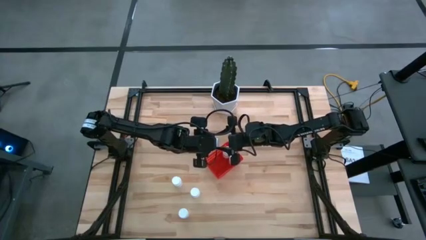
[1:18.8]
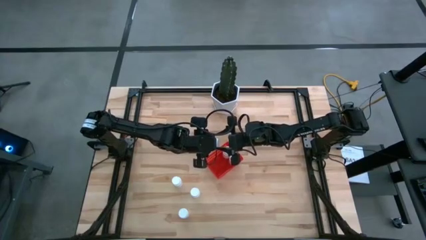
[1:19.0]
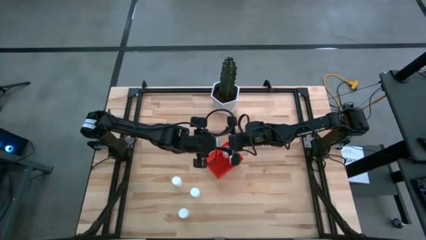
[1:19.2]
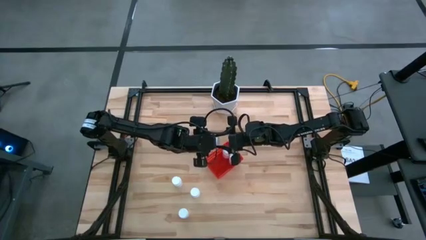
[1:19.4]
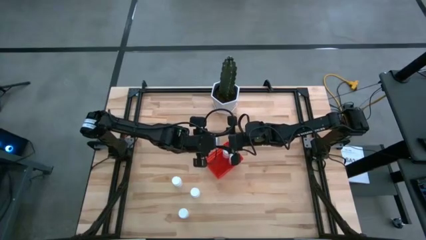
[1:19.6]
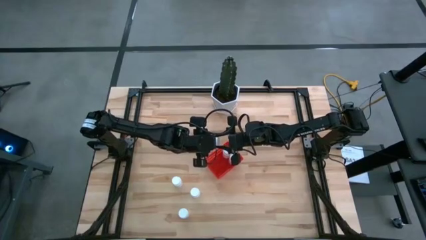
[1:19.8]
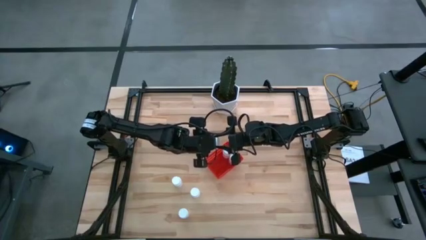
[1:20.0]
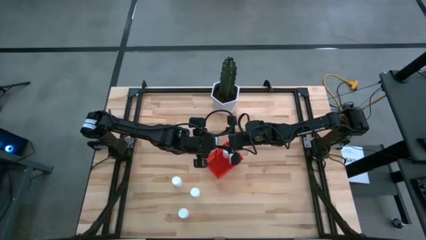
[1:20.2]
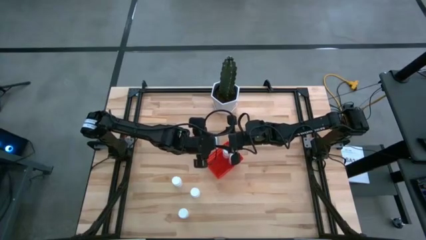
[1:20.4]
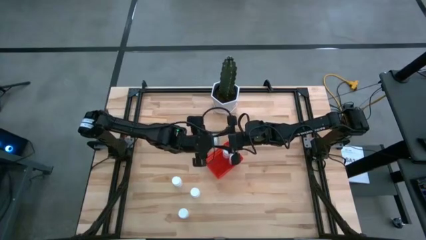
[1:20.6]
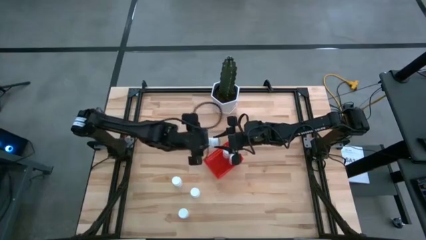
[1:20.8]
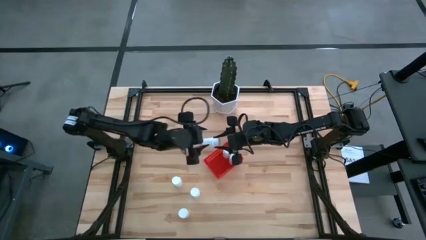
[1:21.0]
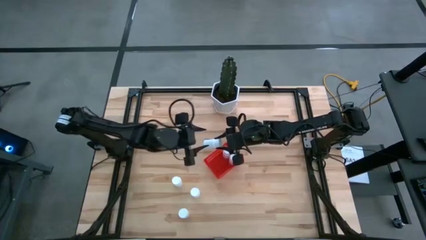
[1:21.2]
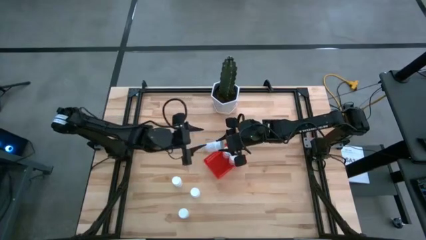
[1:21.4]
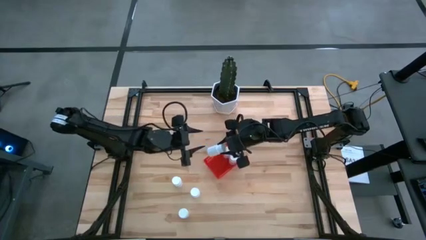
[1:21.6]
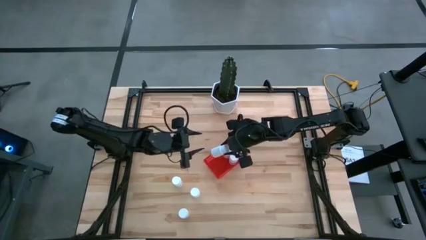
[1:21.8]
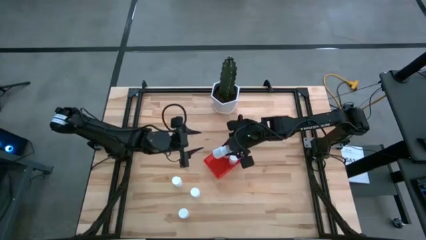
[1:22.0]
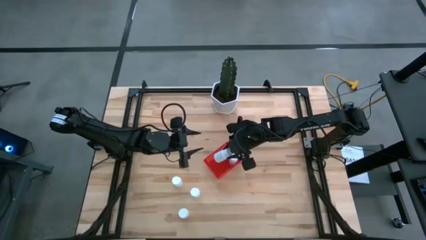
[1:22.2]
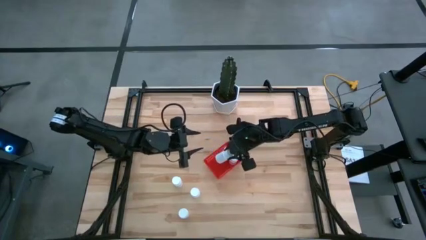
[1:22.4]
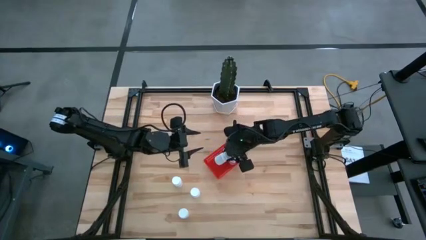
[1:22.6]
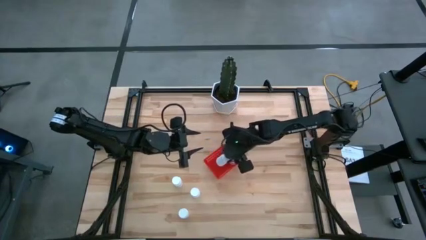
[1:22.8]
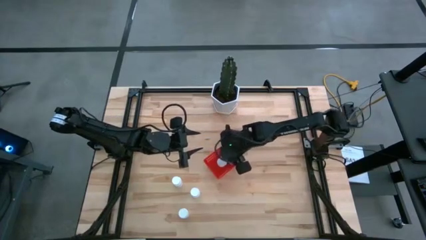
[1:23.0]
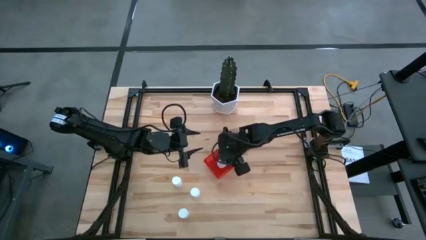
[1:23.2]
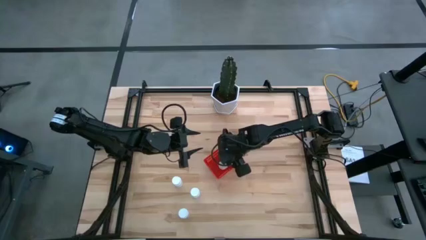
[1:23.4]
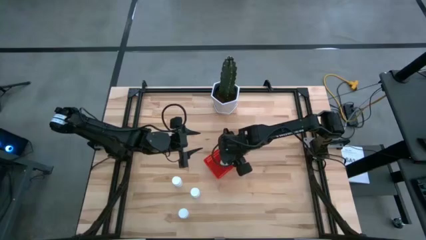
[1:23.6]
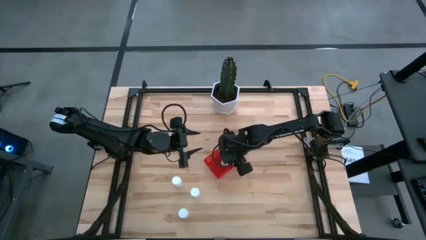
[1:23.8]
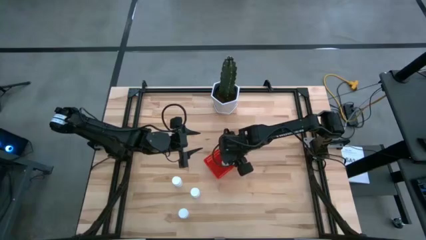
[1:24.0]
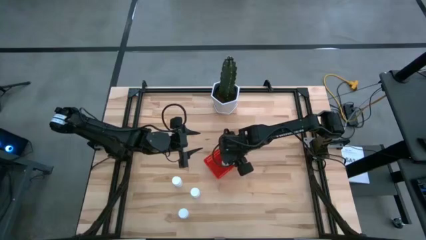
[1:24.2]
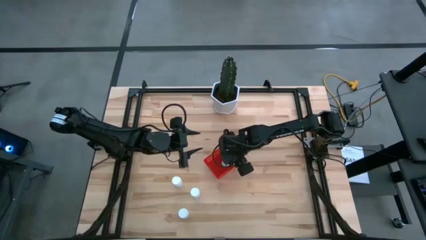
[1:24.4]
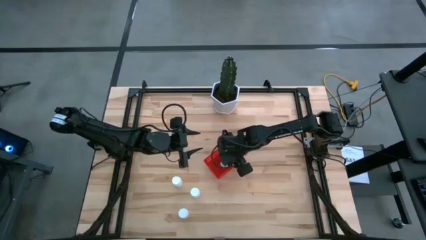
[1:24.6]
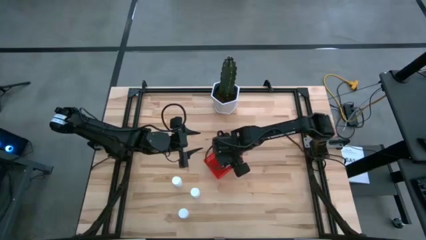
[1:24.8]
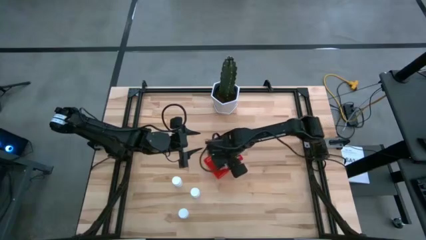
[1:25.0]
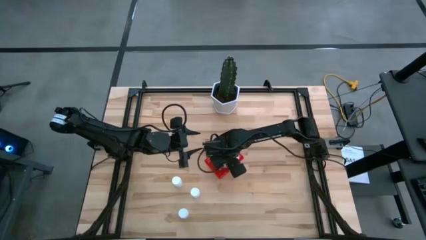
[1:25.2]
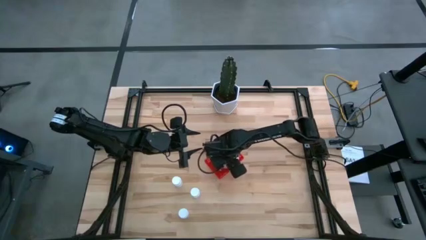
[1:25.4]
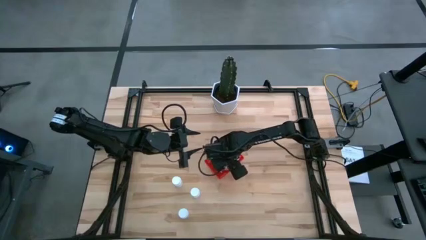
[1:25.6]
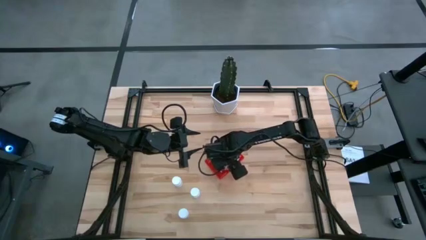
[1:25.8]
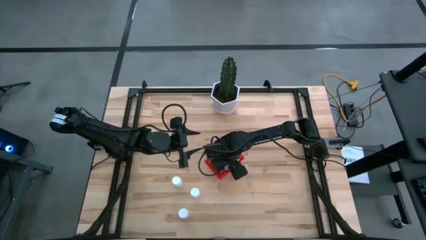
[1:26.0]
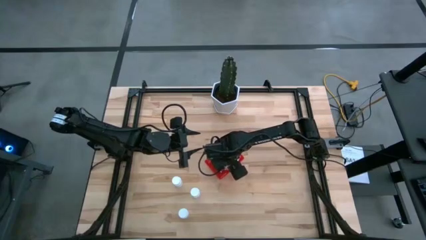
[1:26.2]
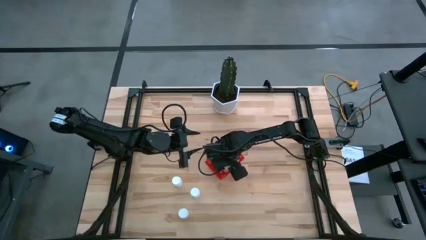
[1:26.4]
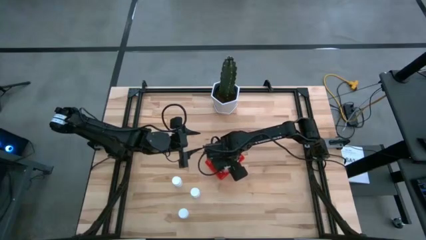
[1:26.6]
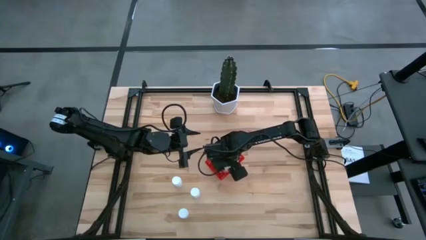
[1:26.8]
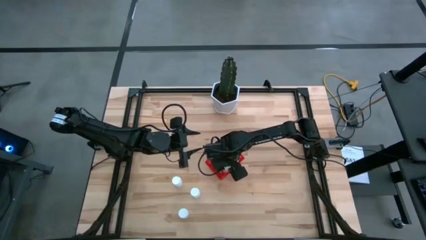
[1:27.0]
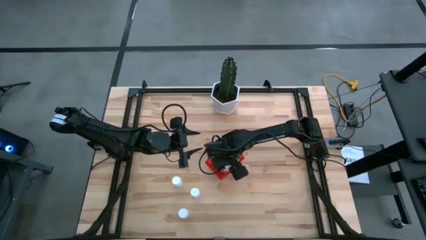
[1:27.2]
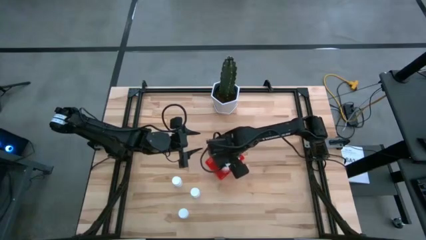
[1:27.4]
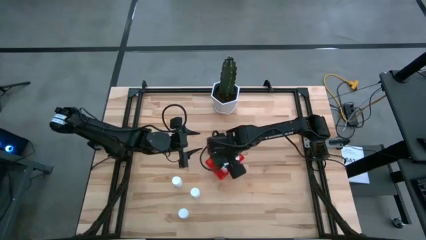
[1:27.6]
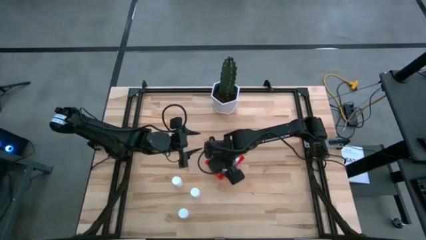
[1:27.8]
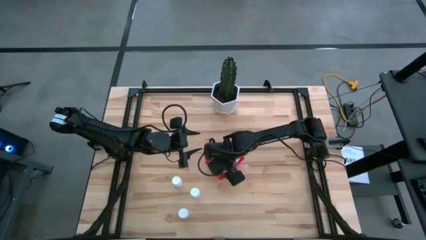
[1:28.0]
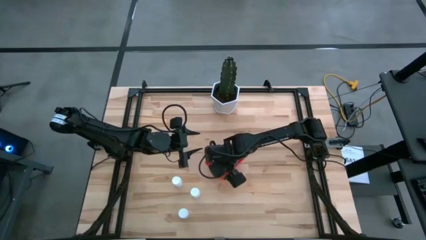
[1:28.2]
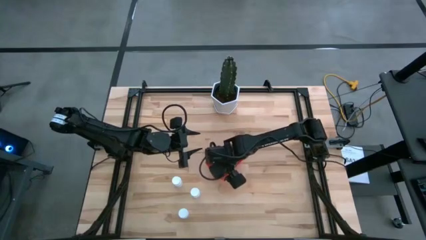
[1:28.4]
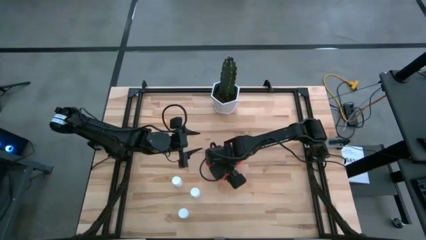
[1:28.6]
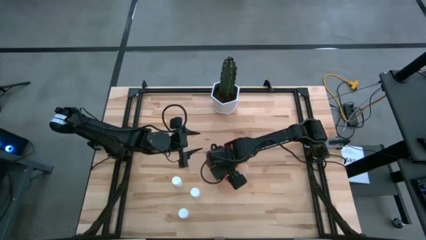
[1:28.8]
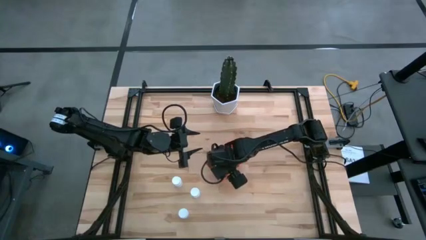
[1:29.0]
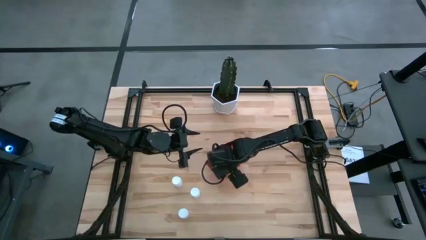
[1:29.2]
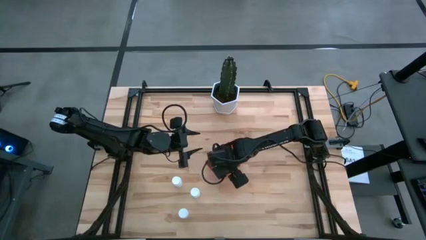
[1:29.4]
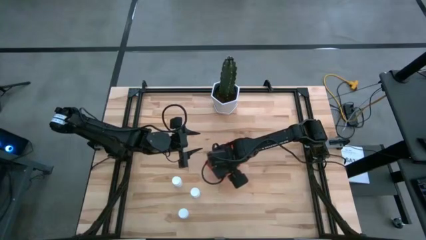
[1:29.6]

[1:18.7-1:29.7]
Task: Pick and place pill bottles into a basket
Put the white pill bottle into the red bin

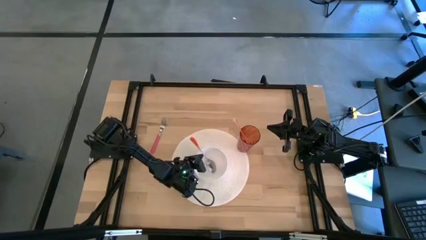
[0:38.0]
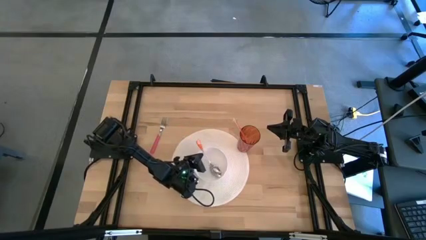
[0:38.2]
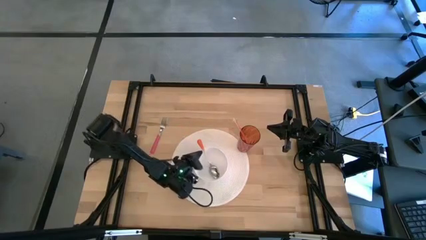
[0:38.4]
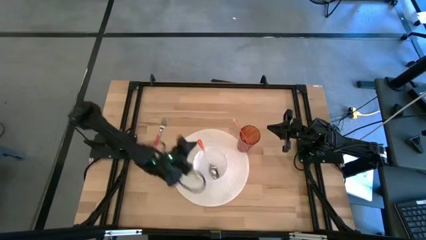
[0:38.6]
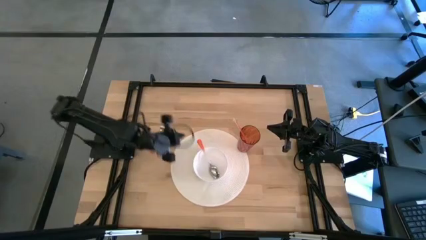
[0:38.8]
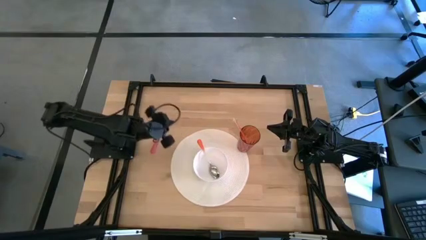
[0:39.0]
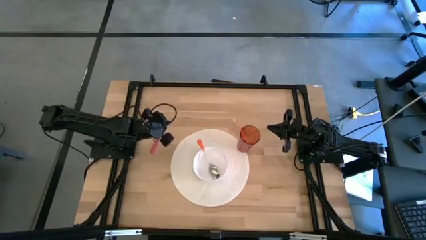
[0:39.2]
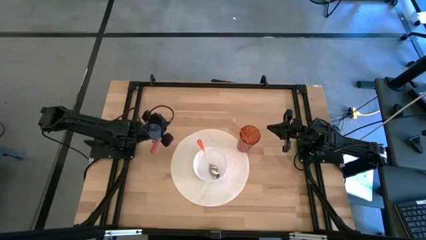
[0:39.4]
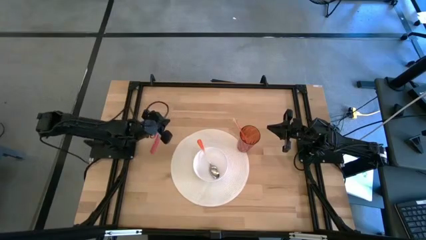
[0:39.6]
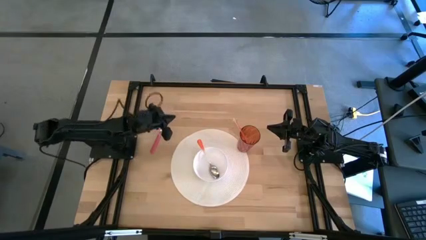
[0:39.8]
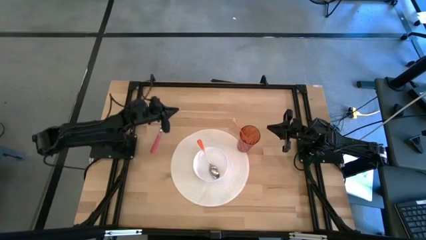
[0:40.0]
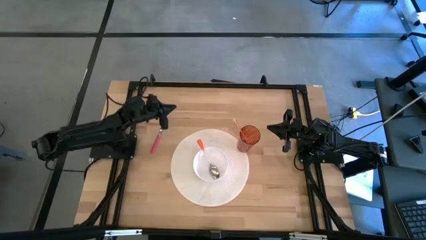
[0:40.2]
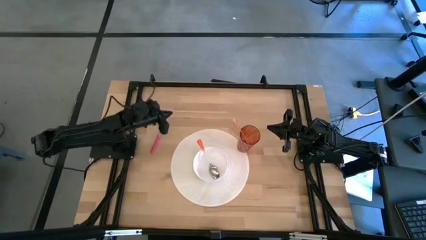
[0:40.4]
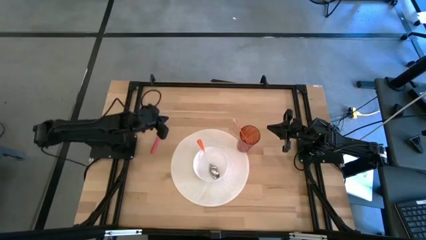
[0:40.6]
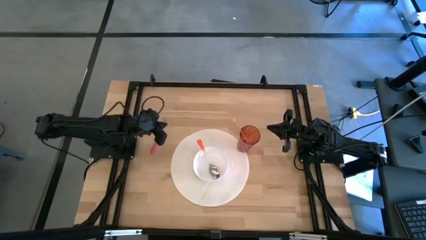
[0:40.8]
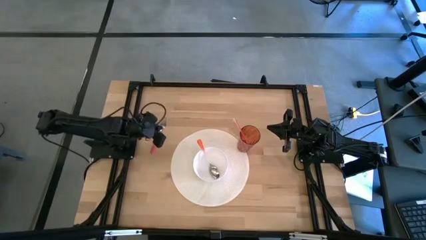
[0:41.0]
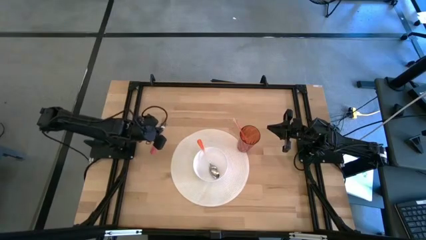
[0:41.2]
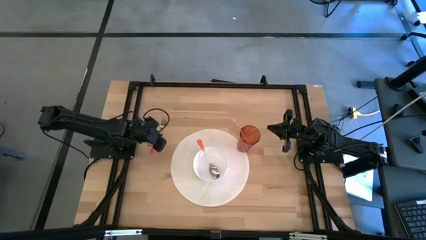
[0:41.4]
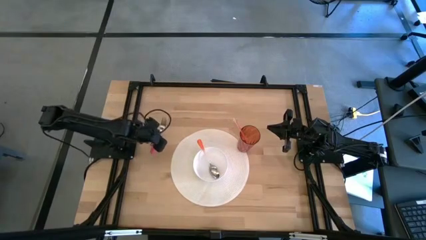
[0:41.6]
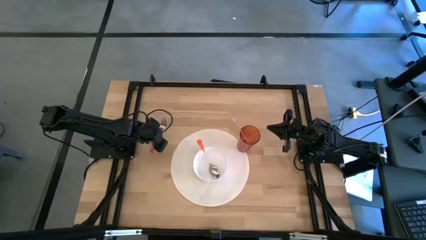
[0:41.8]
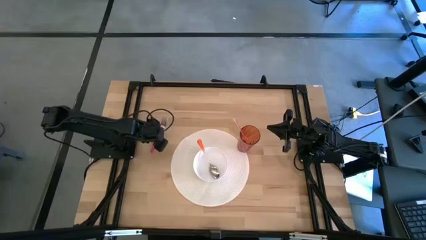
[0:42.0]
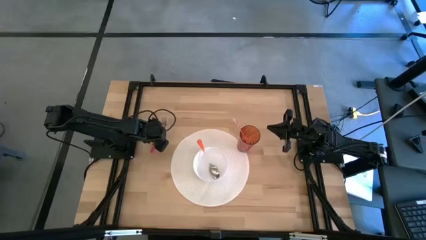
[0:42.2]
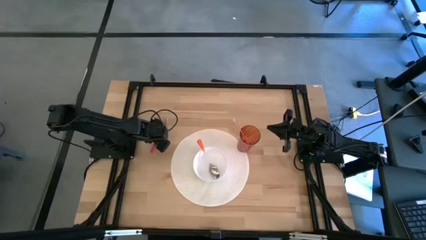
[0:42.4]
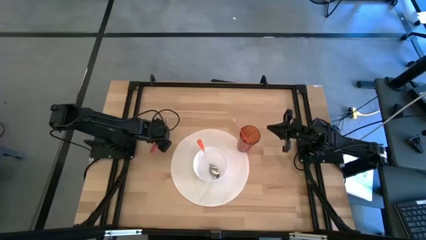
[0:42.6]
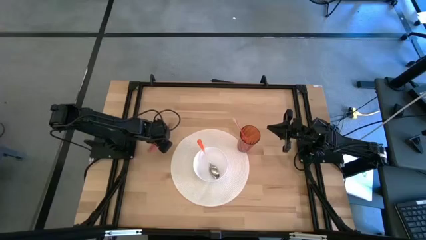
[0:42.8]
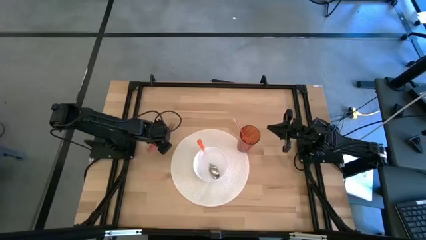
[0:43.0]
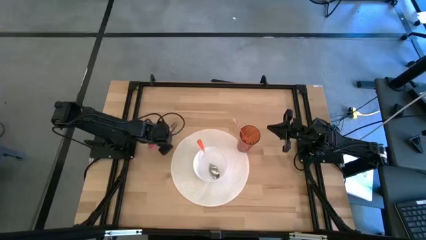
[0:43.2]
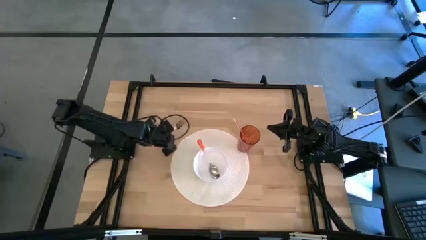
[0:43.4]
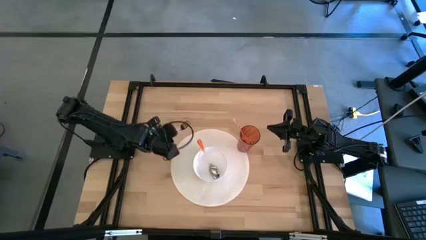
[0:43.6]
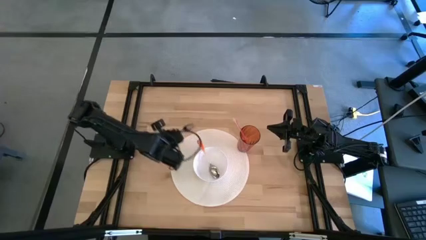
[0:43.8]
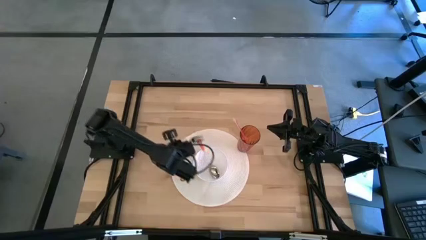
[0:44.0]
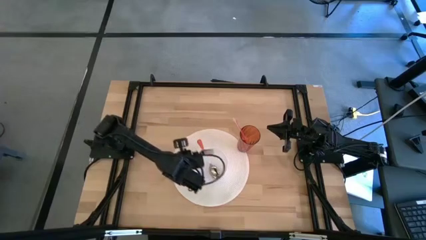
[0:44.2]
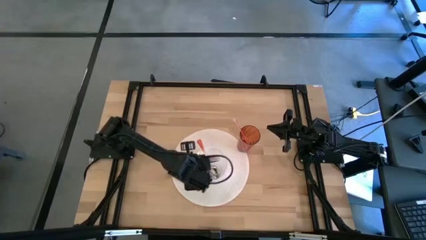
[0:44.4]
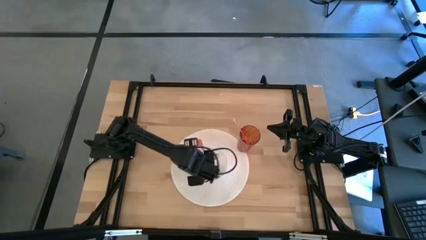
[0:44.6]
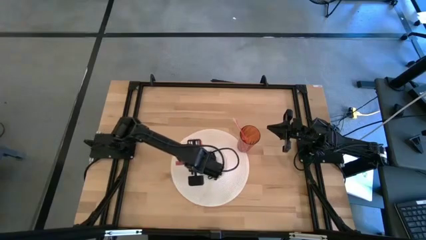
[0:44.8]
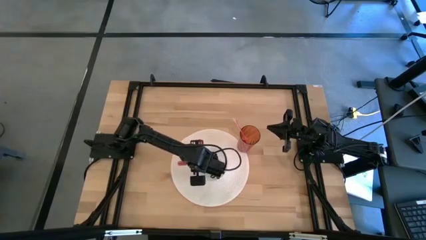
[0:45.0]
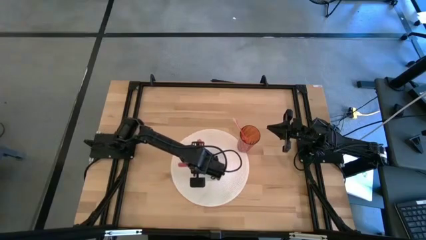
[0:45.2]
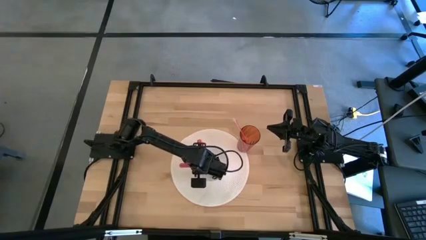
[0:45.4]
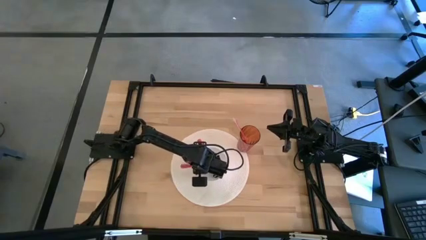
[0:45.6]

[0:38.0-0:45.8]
Task: Pick & Place Utensil
Put the pink fork into the white bowl on the mat
